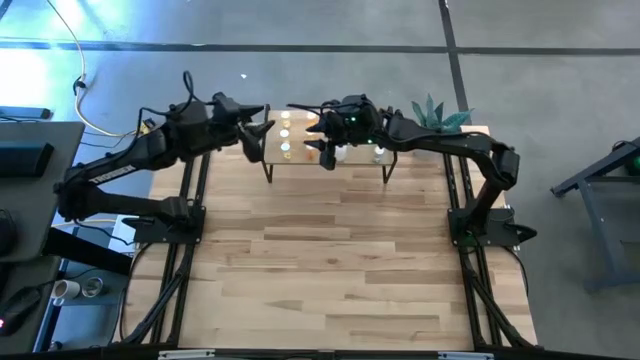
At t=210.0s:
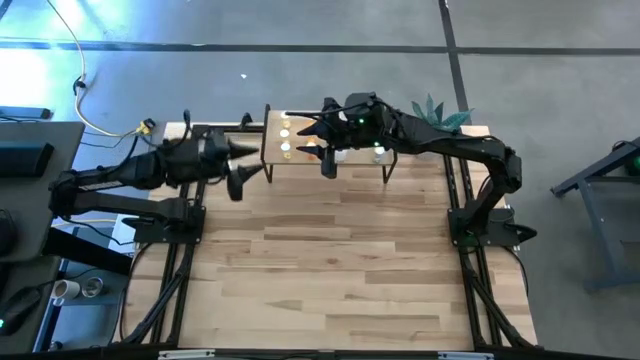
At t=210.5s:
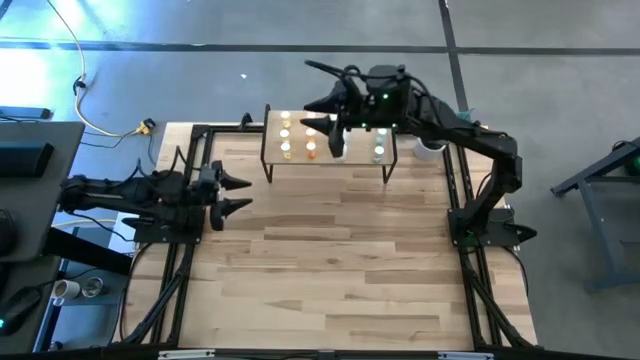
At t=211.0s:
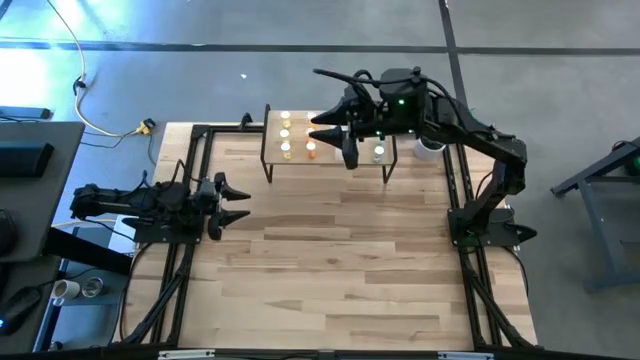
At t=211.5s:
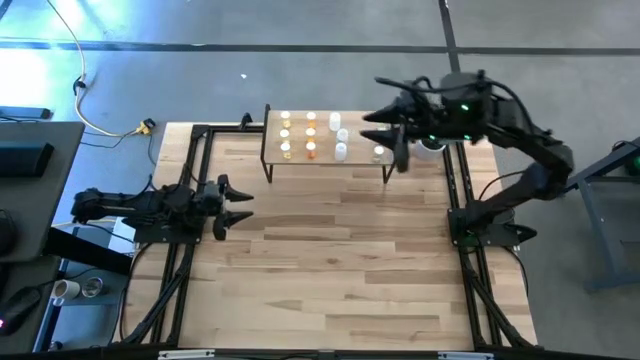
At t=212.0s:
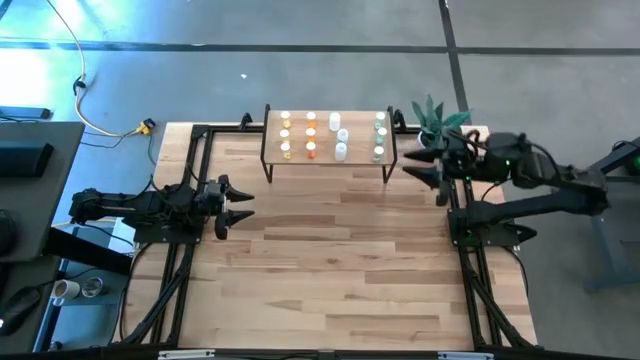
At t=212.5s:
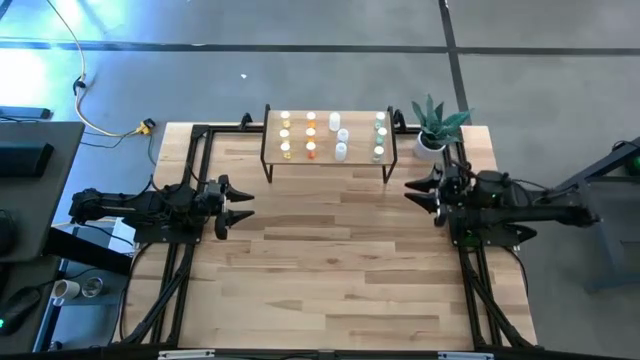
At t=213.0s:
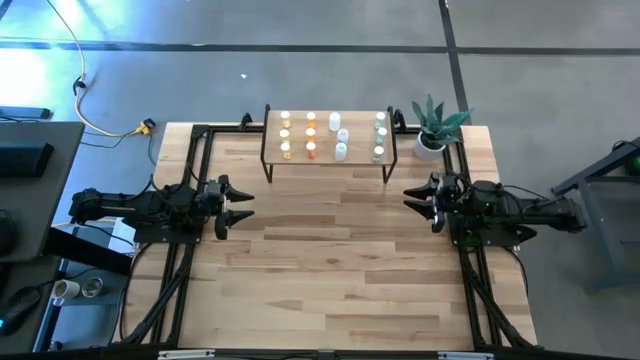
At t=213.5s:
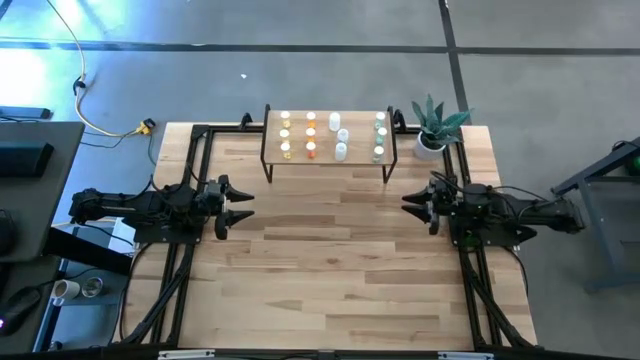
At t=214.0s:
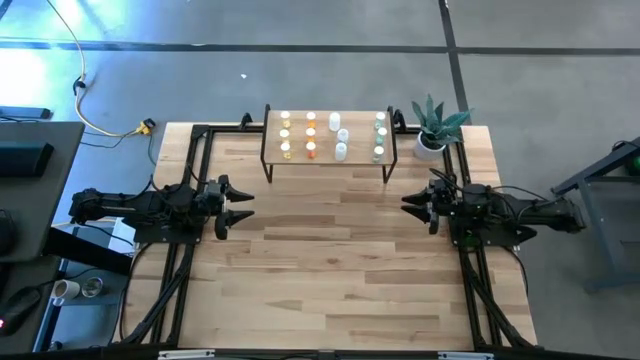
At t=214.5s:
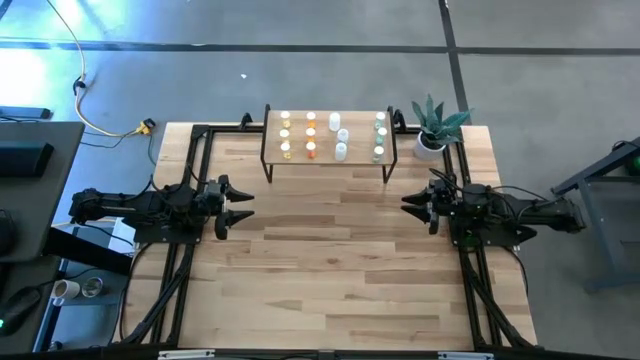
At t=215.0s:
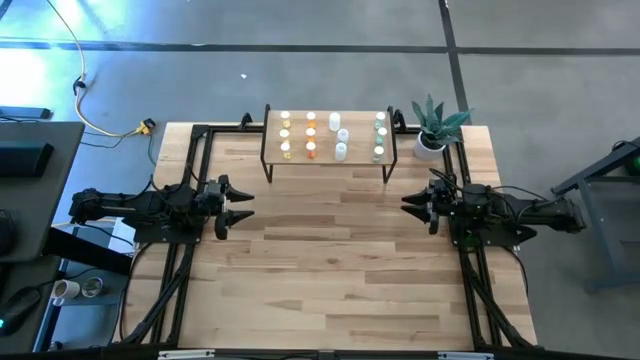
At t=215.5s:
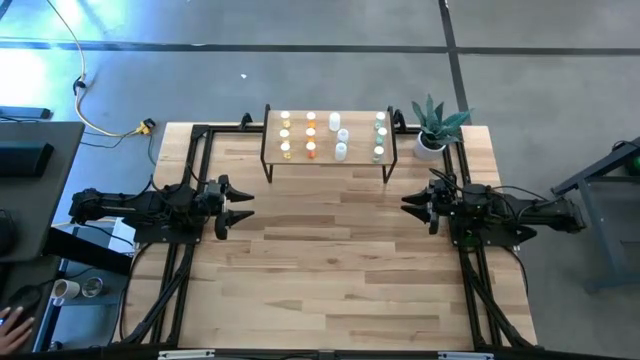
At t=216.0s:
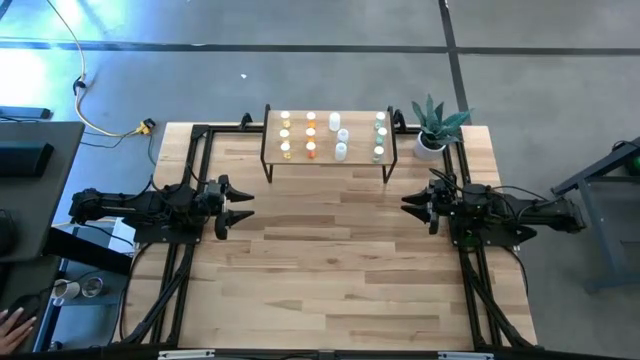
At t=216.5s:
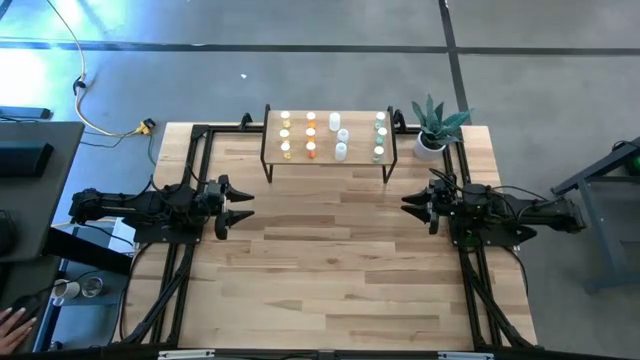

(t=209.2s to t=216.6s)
Task: Pick and place medicine bottles onto shelf by color
Return to Home Position

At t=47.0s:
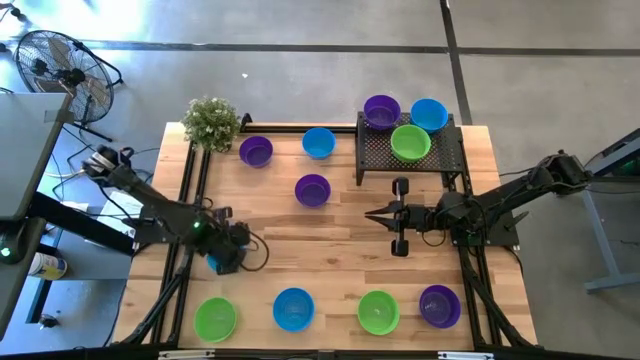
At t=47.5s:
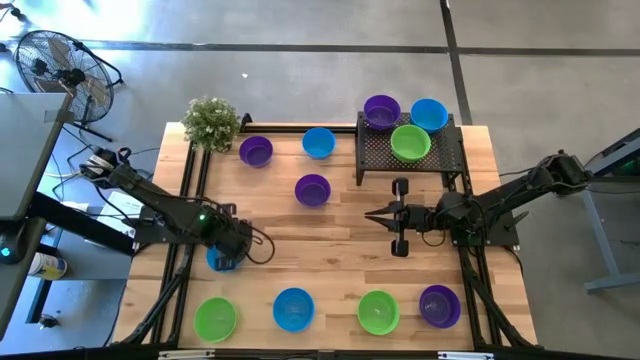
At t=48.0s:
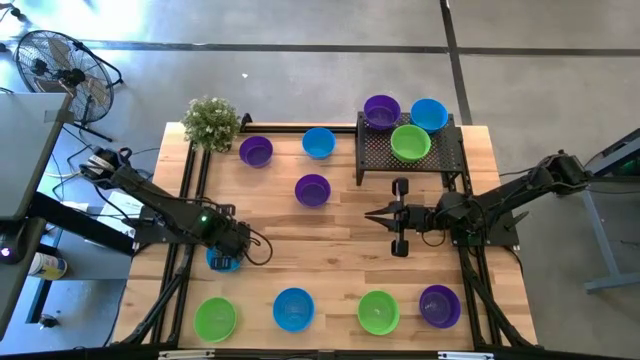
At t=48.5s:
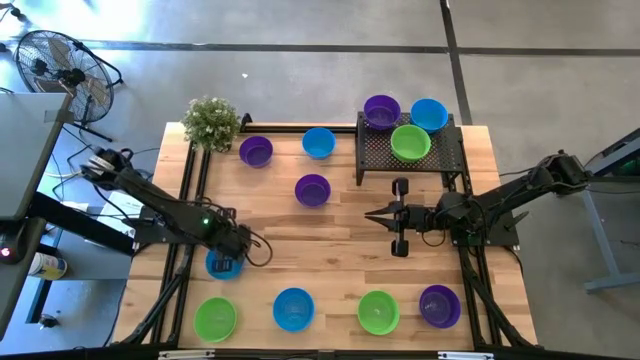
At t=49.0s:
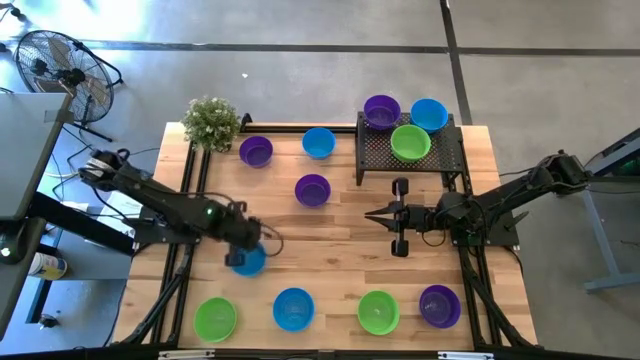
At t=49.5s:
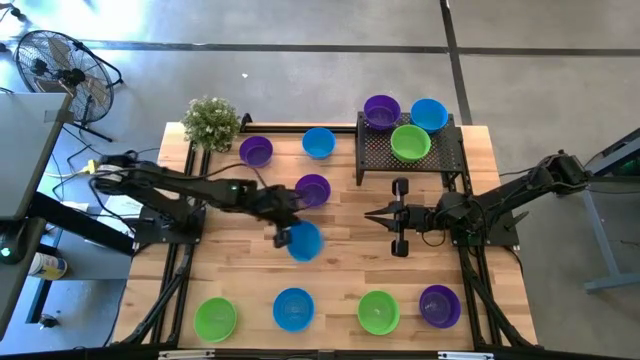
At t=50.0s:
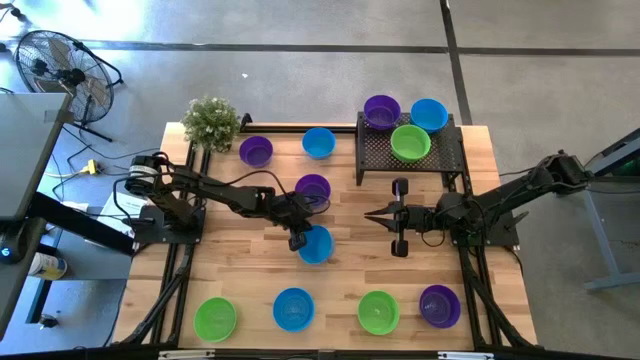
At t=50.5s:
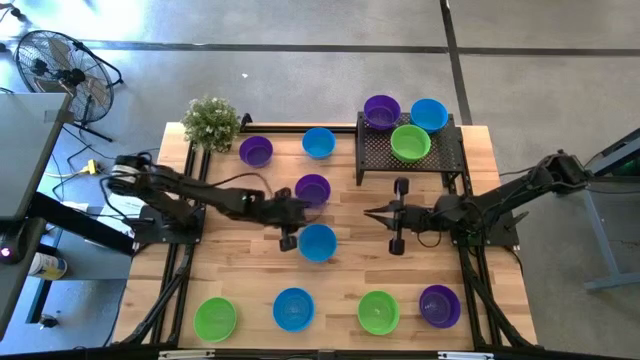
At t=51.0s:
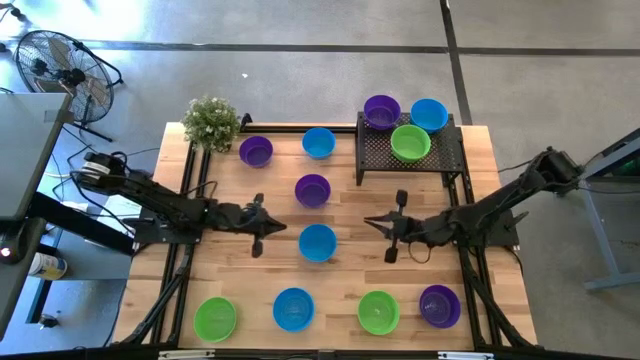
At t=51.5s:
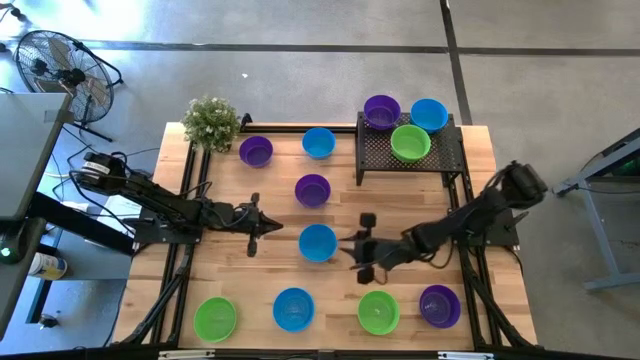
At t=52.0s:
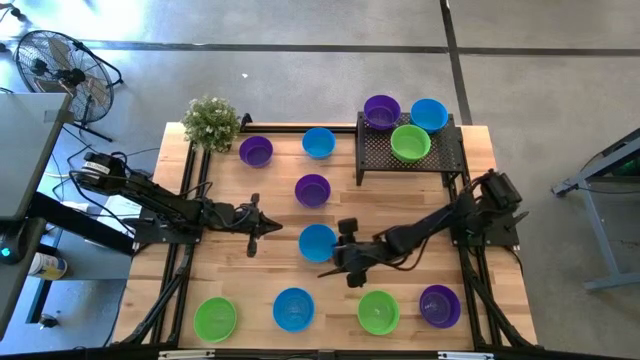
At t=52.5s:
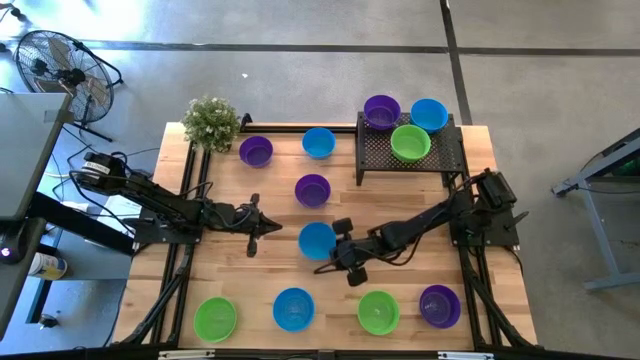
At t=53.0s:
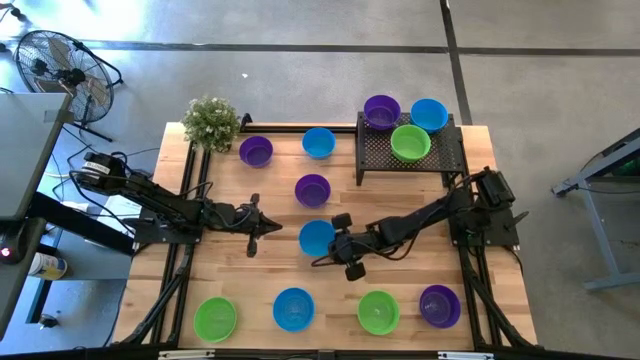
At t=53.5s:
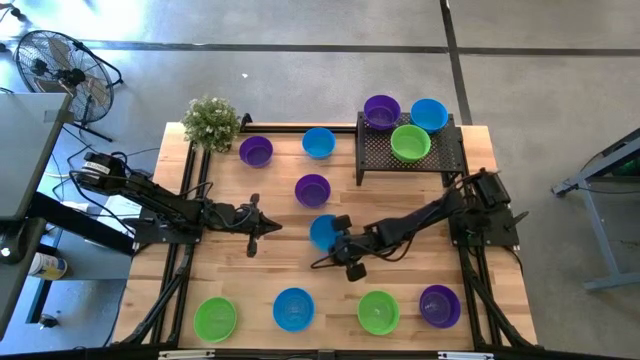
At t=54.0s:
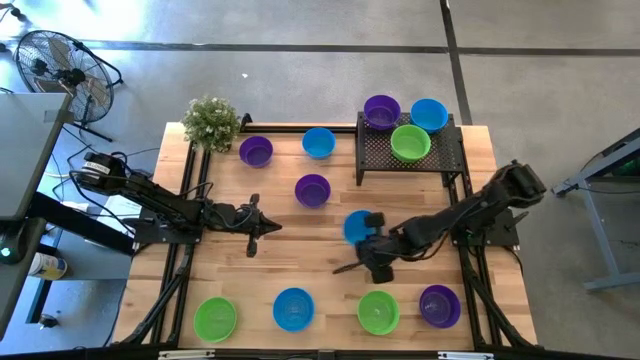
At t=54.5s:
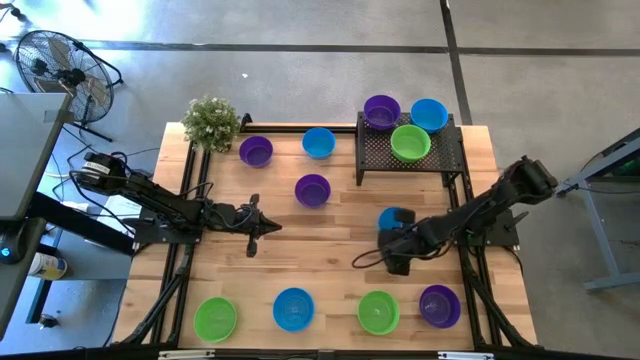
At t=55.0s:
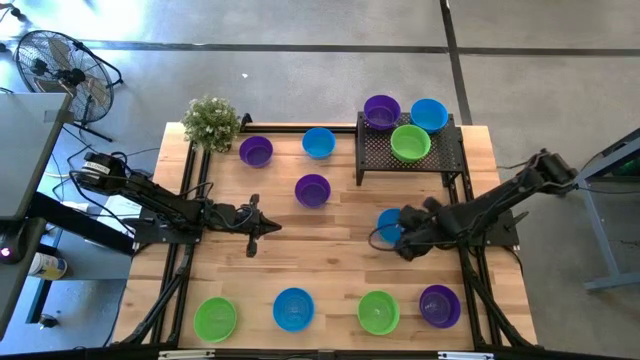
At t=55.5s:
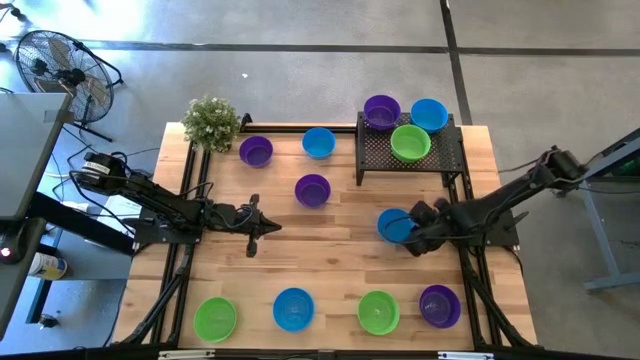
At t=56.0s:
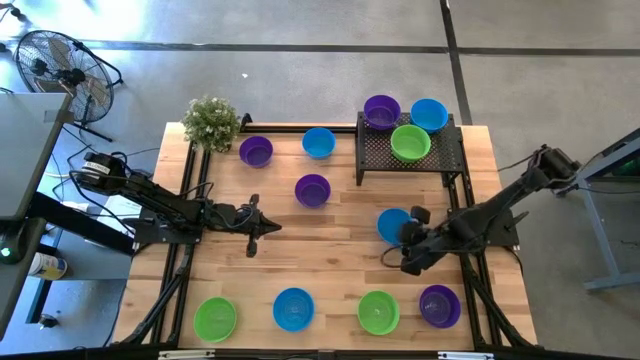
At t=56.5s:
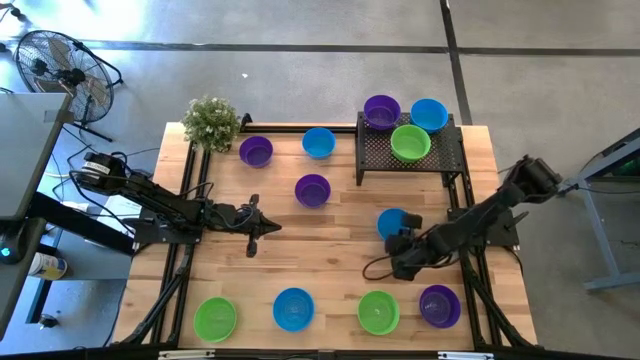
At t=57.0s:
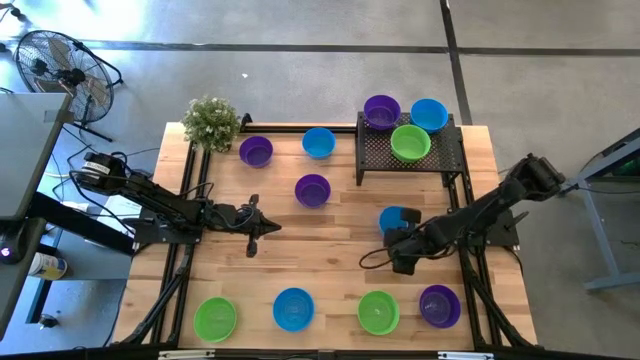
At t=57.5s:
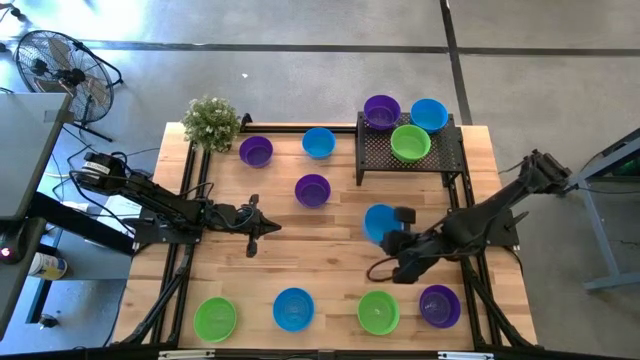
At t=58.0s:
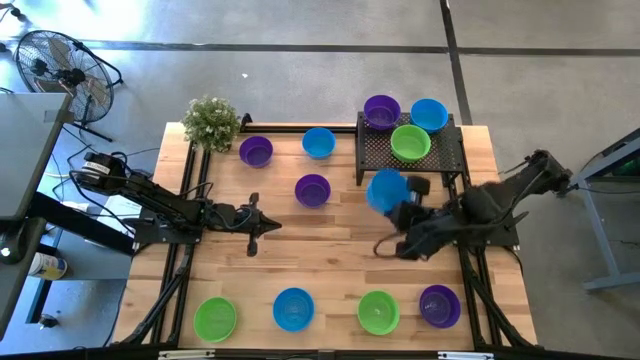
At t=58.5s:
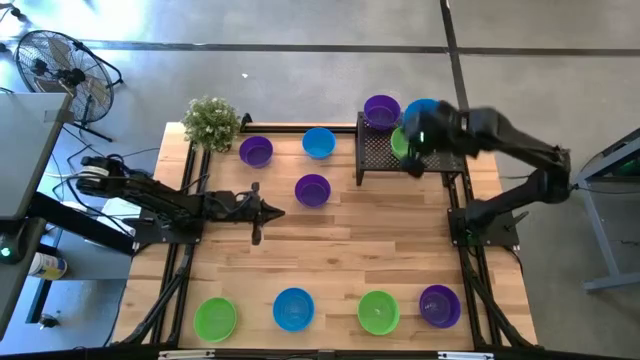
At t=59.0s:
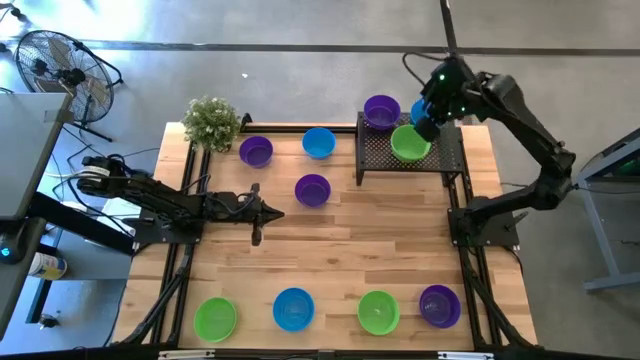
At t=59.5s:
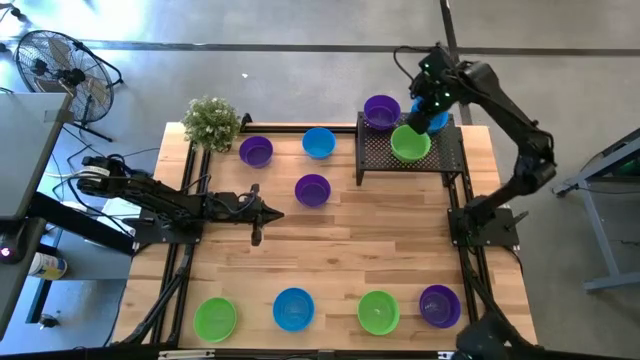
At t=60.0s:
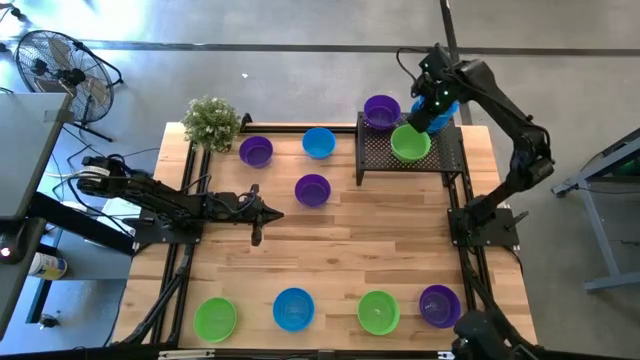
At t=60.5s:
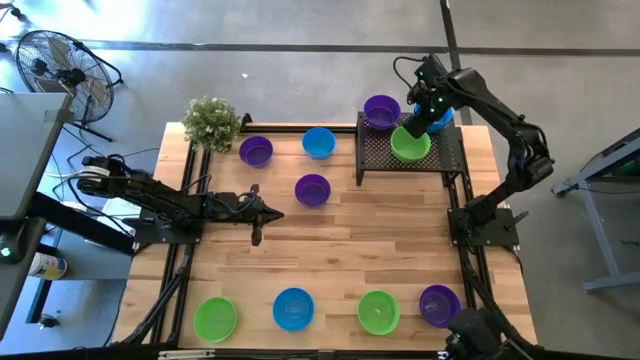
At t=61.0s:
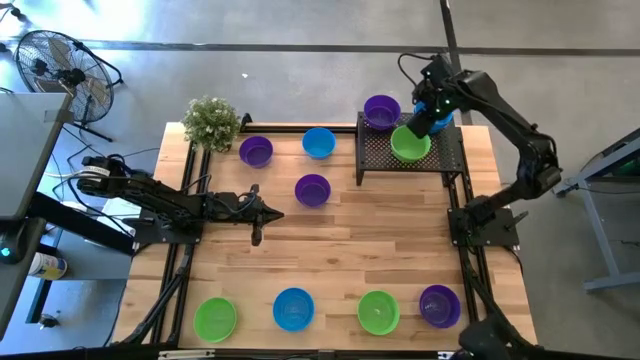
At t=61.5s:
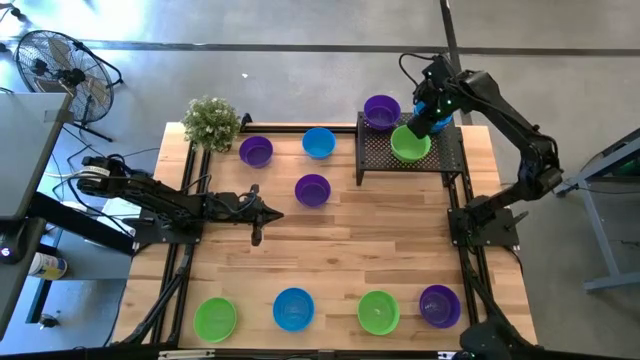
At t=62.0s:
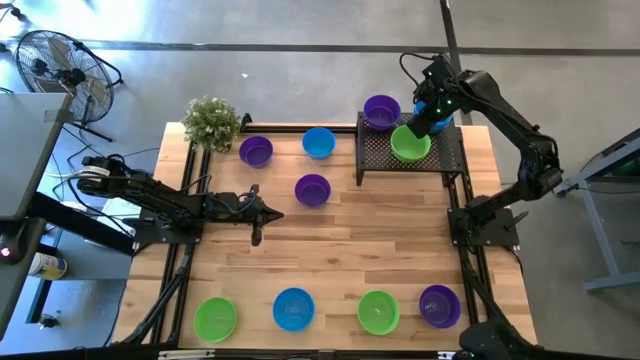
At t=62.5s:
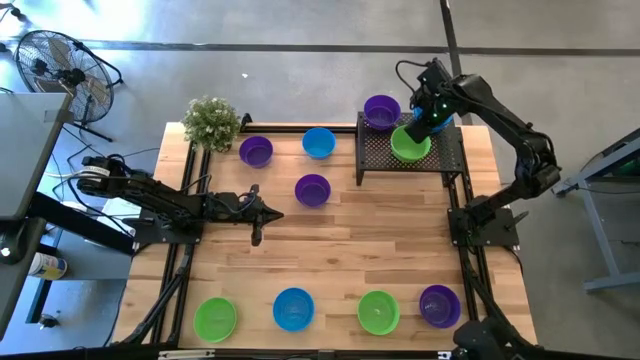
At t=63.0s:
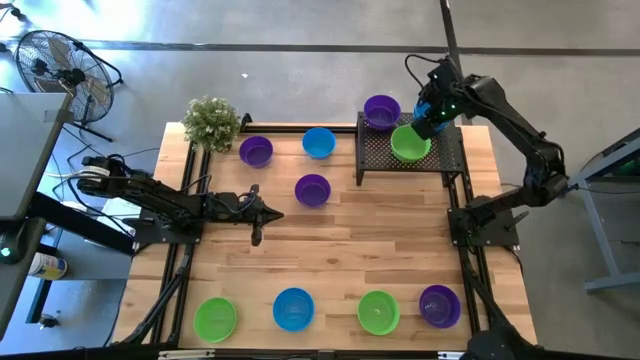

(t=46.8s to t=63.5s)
Task: Pick & Place Mini bowls
Stack the blue bowl on the other blue bowl on the shelf
